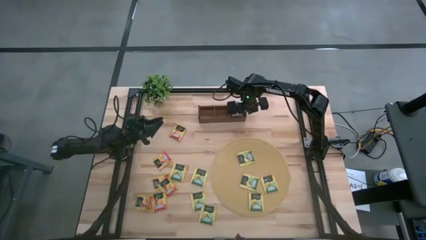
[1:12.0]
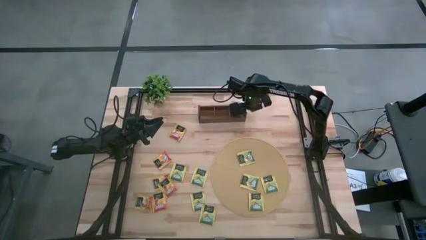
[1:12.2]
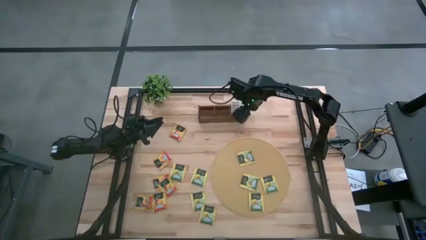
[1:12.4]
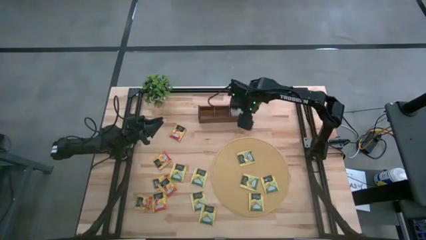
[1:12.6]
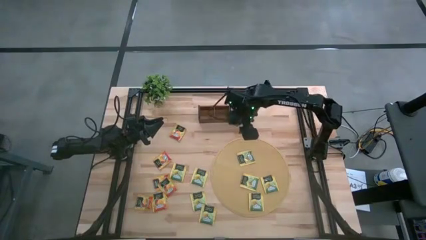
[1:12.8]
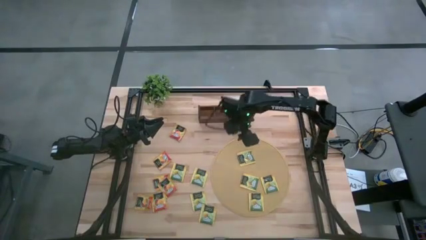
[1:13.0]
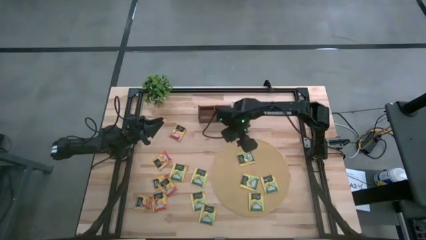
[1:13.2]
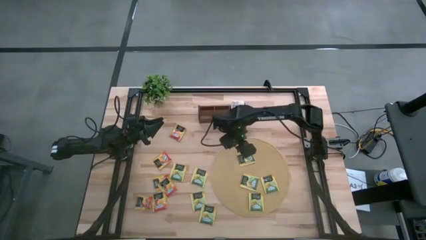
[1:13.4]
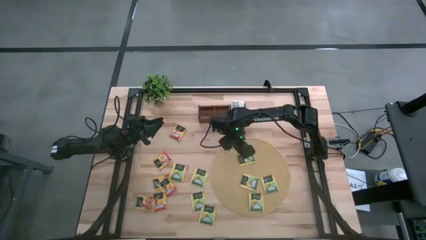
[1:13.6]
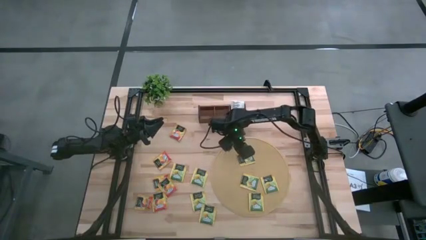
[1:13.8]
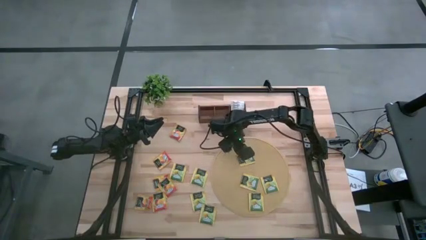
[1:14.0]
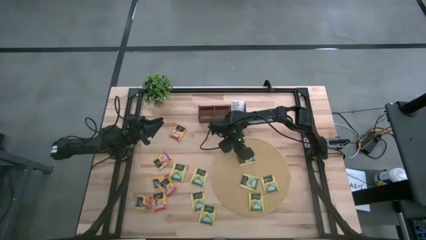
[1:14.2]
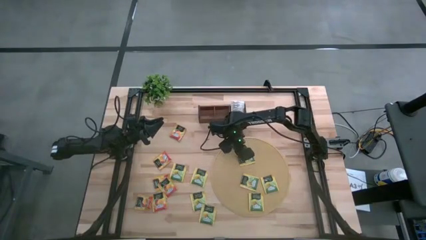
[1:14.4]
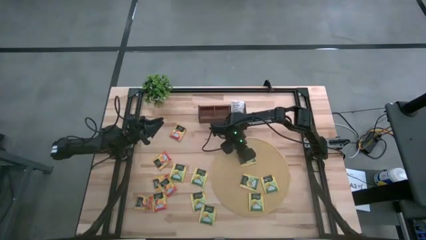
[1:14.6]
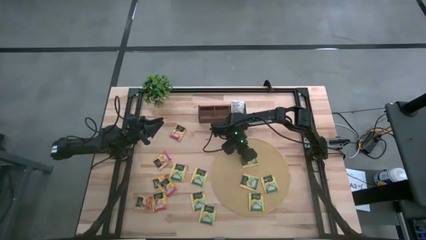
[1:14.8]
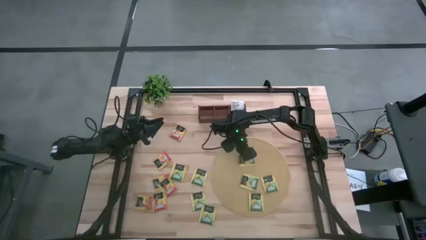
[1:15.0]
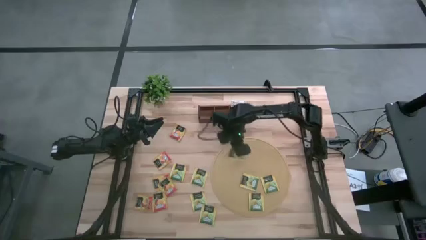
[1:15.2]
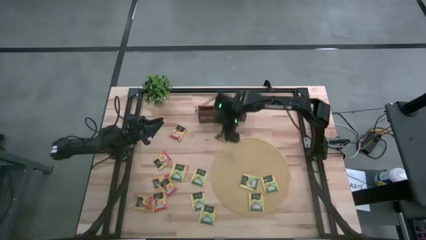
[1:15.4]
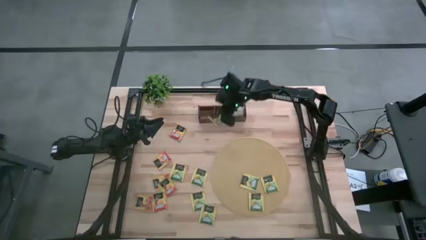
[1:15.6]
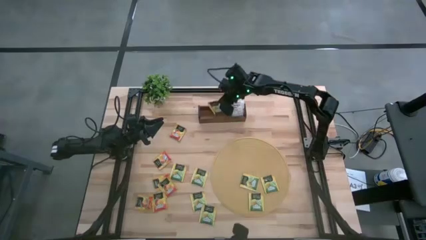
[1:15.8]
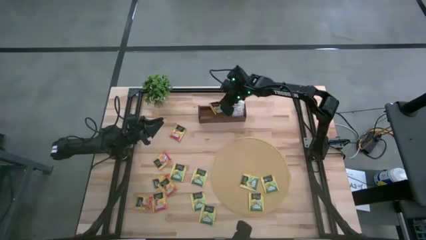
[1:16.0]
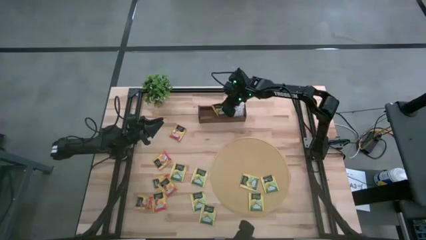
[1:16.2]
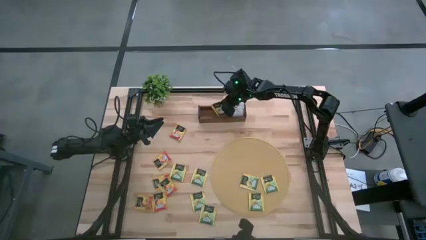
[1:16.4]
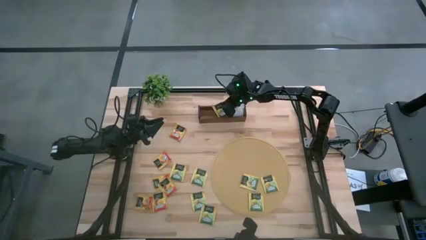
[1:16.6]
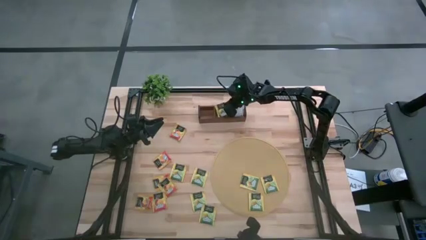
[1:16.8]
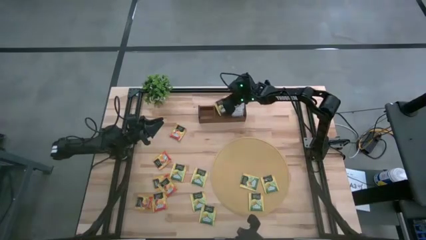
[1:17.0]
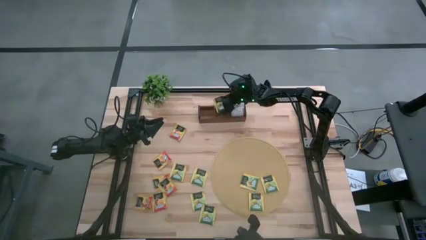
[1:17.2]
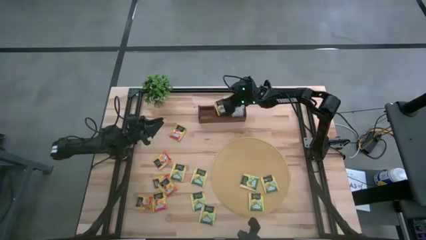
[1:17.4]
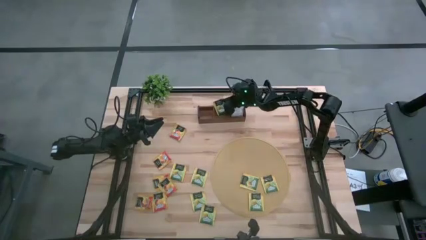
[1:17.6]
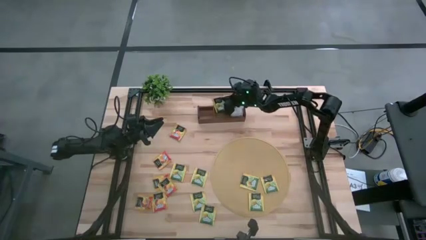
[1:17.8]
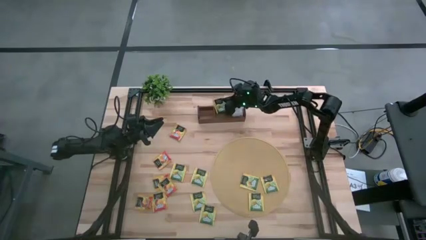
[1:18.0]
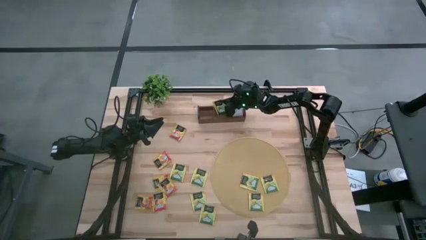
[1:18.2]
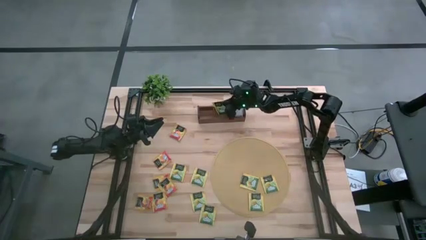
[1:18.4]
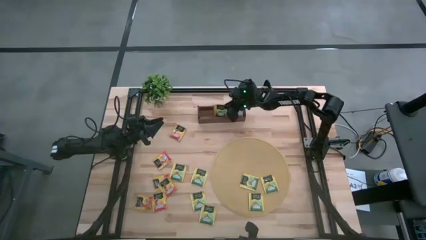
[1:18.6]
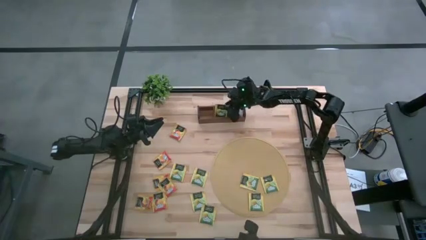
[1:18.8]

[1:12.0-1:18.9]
Task: Pick & Place Tea
Put the yellow tea bag into the middle section of the wooden organizer

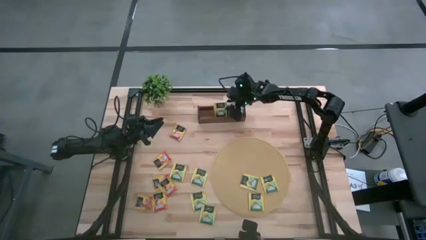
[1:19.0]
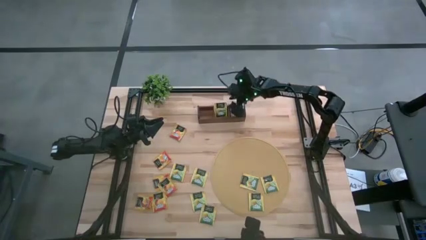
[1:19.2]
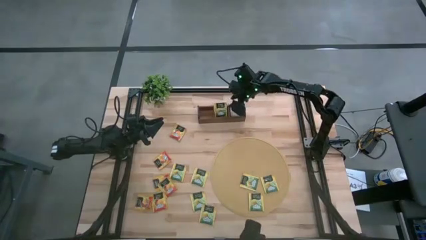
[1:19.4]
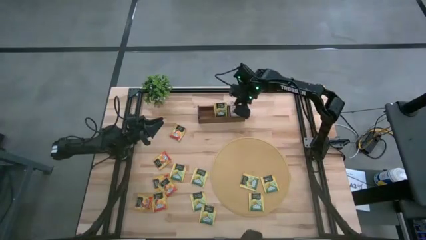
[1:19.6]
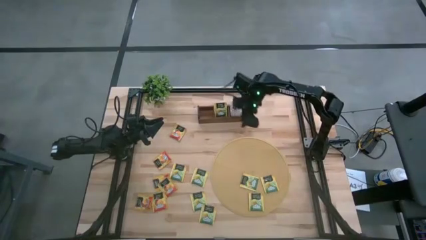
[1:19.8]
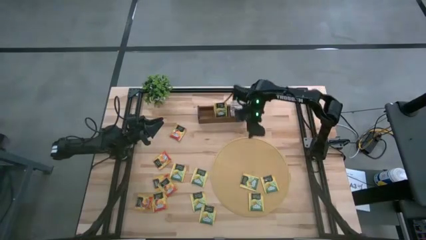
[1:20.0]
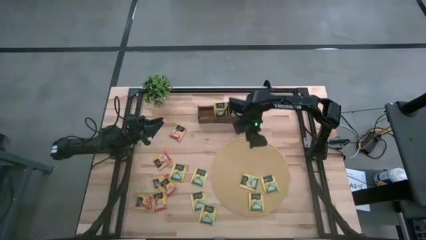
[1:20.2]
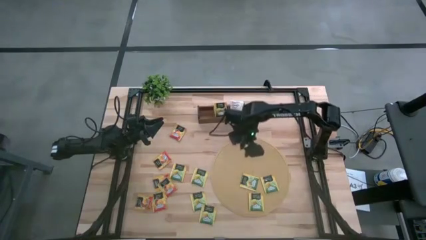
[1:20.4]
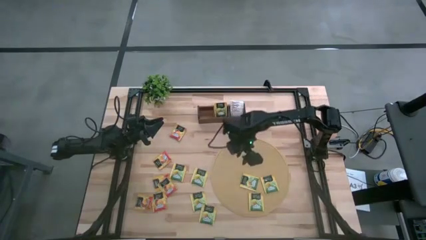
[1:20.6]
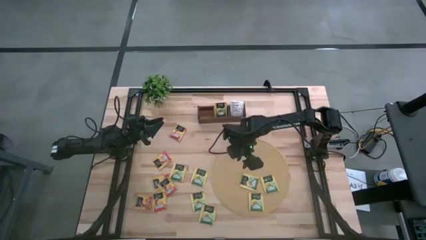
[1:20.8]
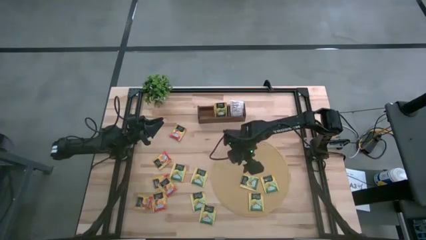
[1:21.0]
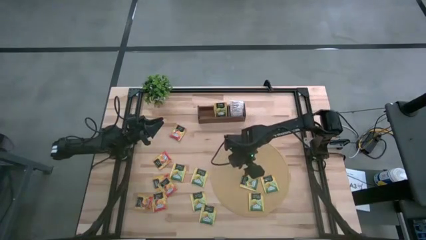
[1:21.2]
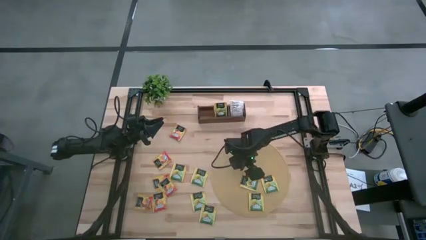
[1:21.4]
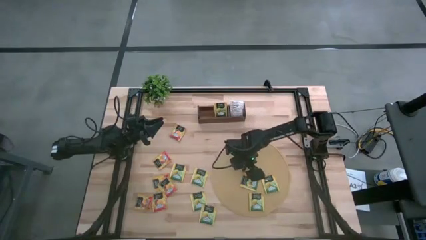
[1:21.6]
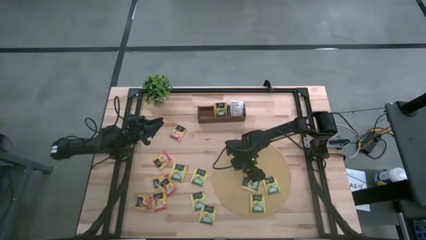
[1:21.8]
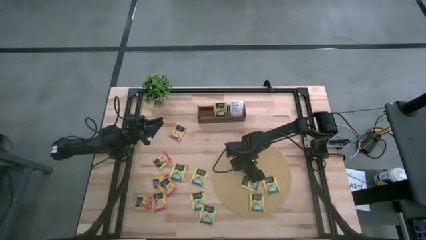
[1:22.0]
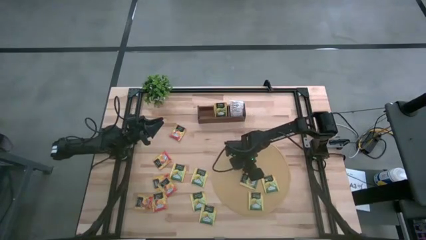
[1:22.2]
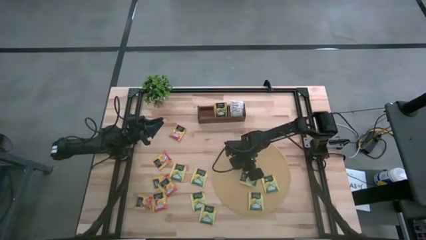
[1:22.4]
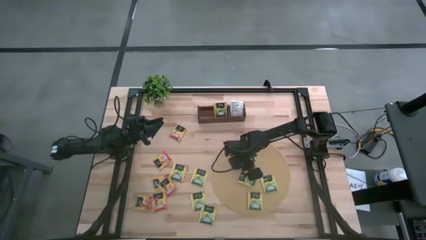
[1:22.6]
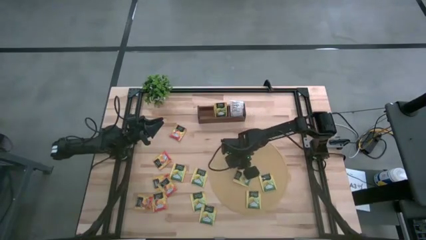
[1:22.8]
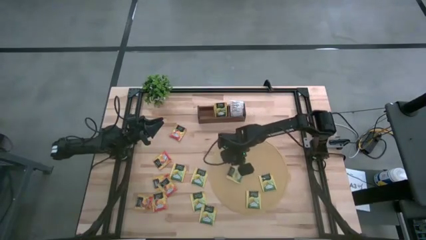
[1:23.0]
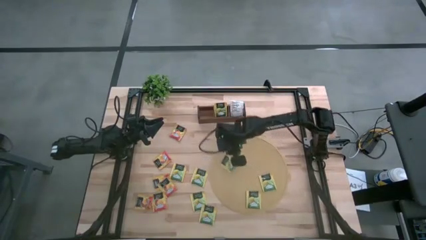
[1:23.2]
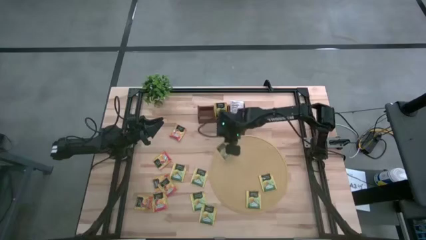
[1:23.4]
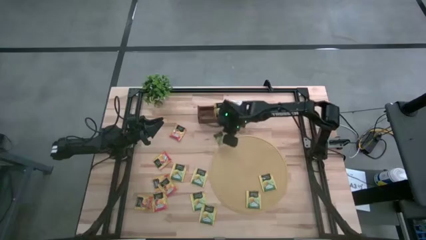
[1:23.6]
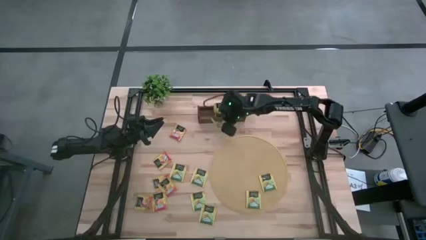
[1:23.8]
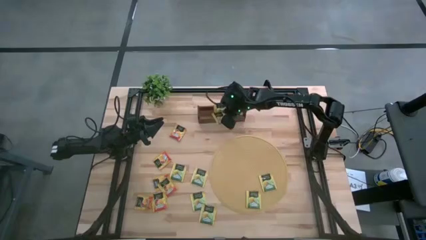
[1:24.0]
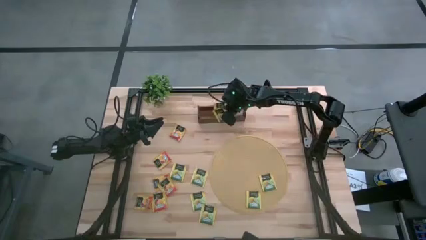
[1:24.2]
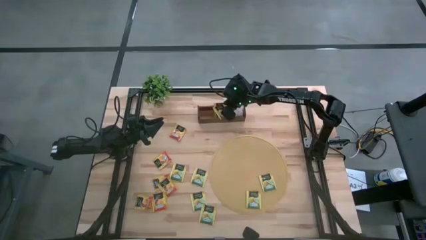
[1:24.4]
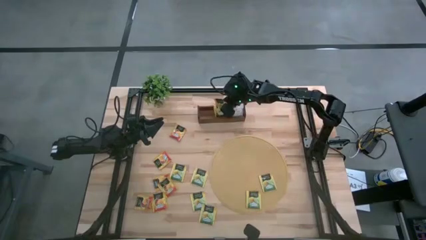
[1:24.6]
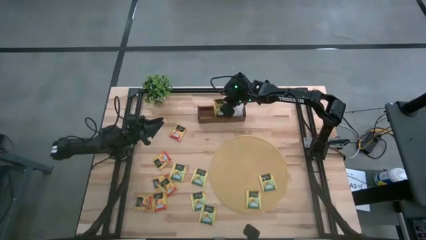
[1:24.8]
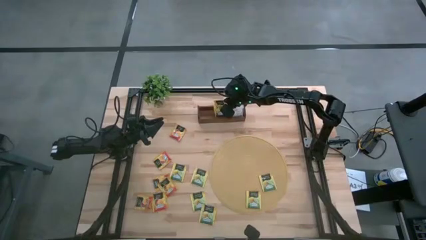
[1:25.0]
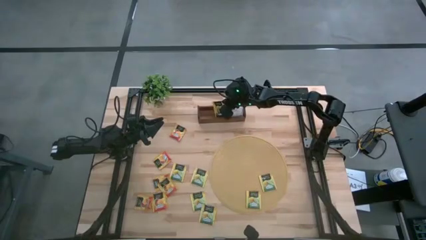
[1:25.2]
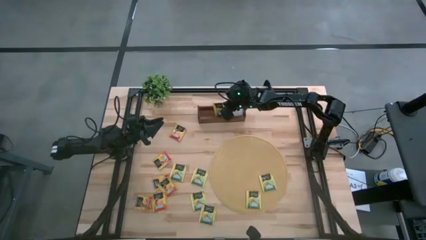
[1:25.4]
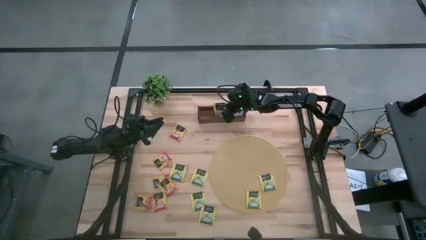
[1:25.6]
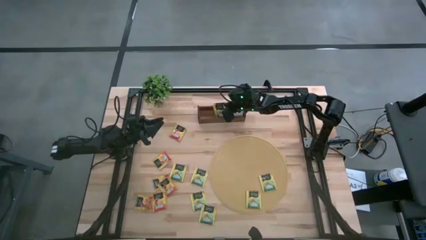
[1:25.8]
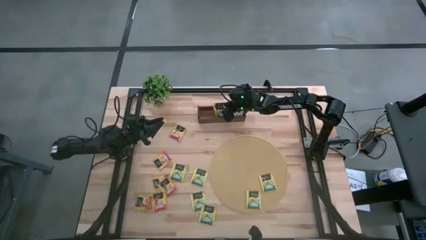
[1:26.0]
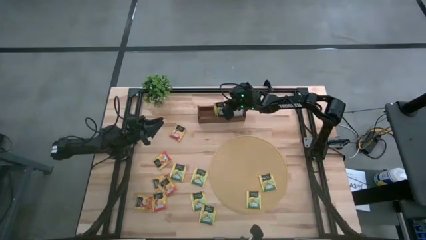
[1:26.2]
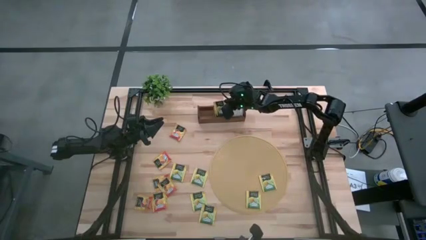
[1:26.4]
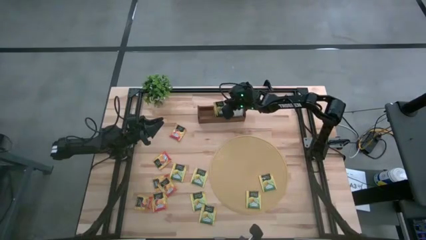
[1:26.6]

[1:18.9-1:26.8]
Put the yellow tea bag into the middle section of the wooden organizer

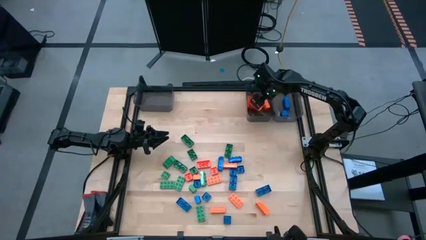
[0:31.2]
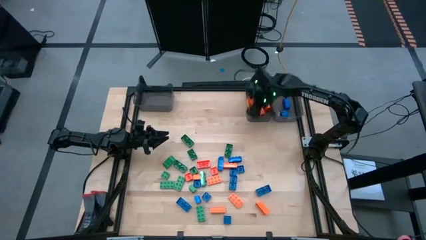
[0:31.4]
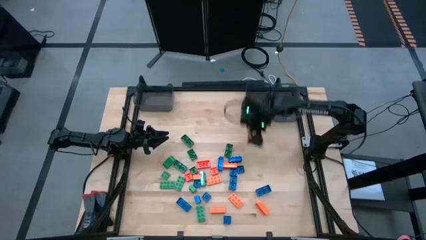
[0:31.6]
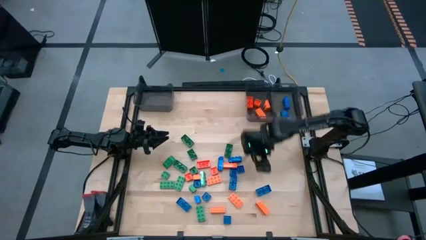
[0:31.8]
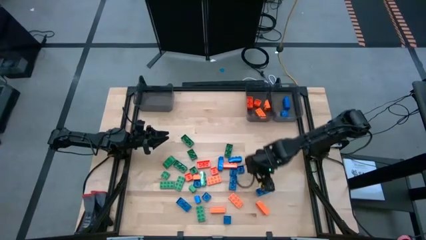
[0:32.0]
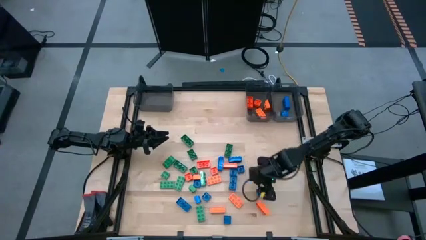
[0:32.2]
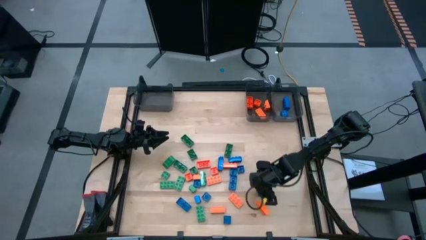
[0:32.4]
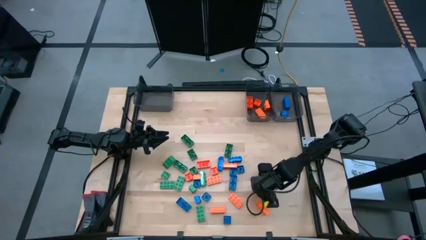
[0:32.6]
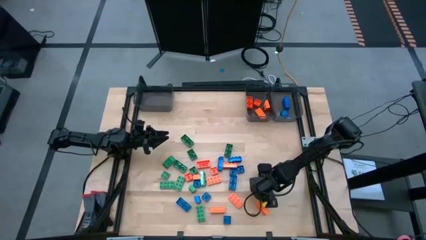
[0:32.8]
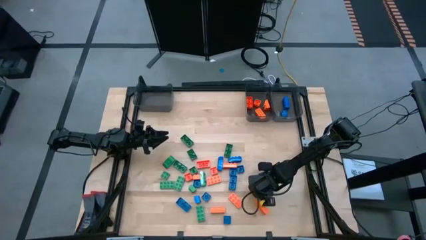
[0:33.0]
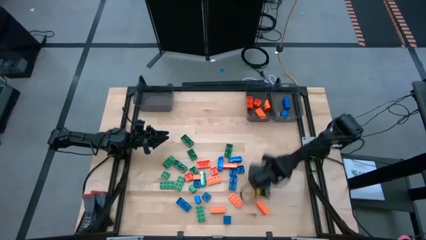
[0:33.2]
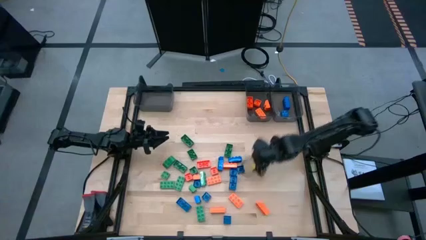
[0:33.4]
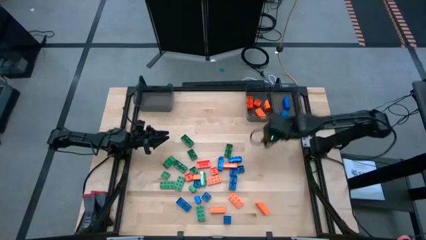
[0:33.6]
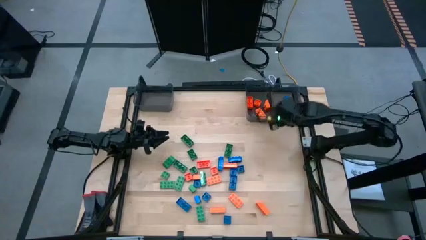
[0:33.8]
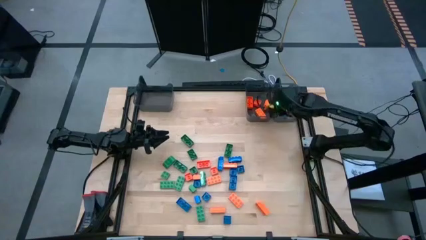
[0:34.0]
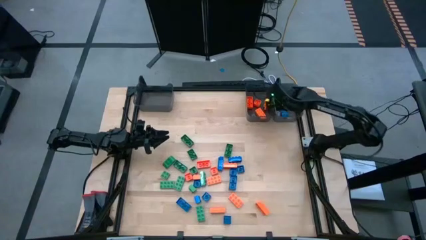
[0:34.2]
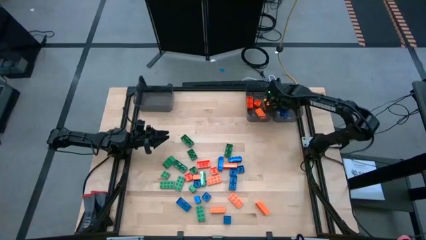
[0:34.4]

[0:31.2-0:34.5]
Task: Sort blocks
Put the blue game piece into the right black bin
